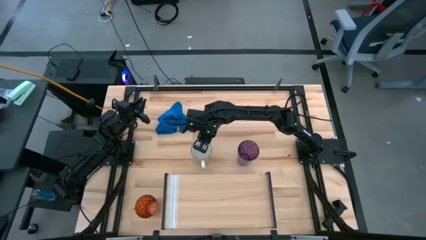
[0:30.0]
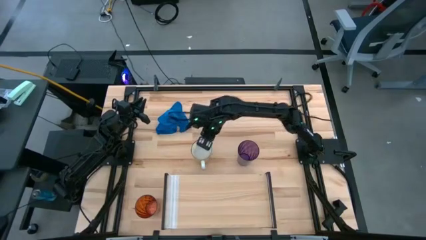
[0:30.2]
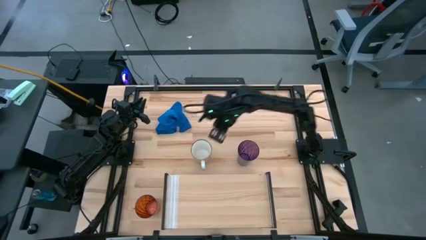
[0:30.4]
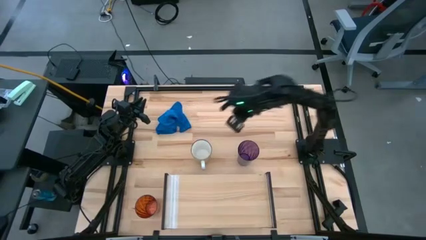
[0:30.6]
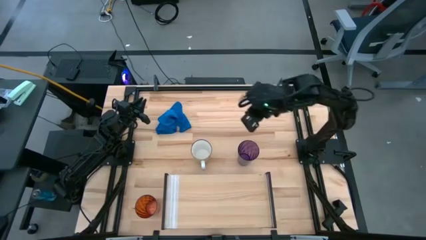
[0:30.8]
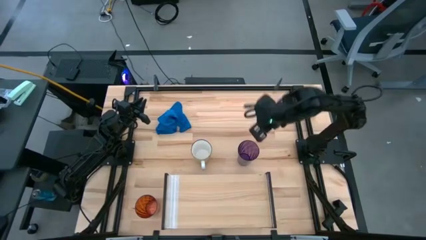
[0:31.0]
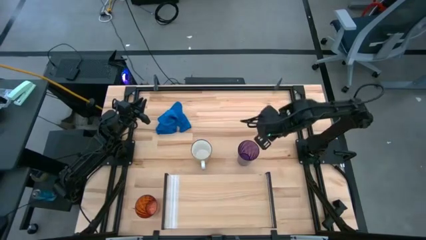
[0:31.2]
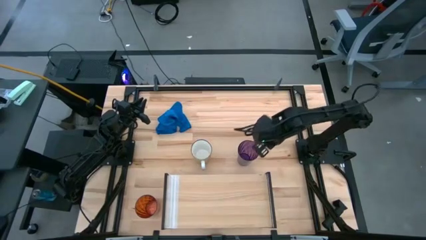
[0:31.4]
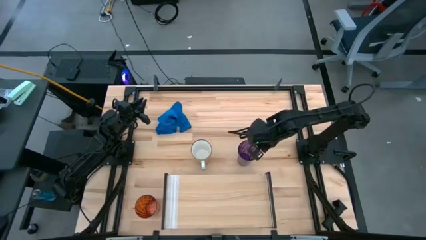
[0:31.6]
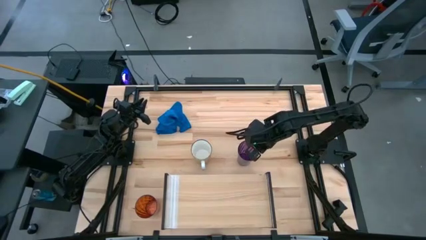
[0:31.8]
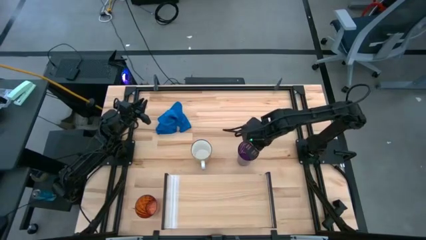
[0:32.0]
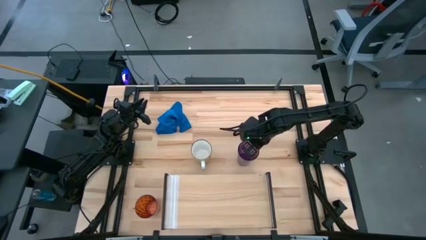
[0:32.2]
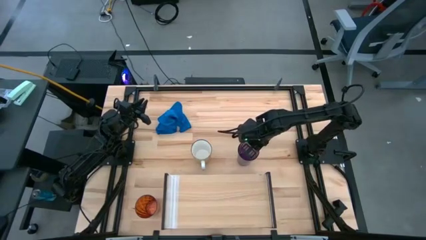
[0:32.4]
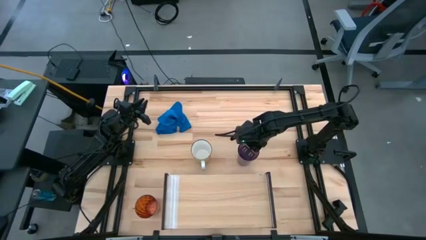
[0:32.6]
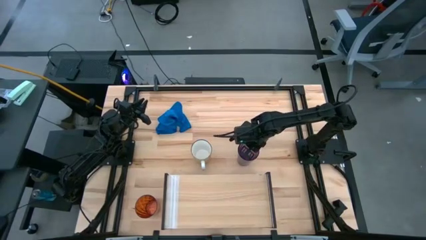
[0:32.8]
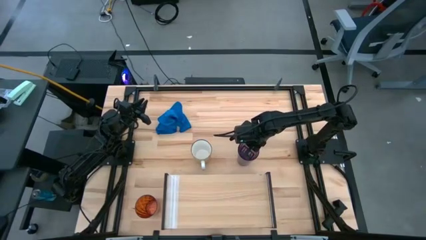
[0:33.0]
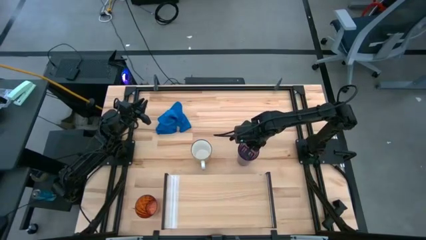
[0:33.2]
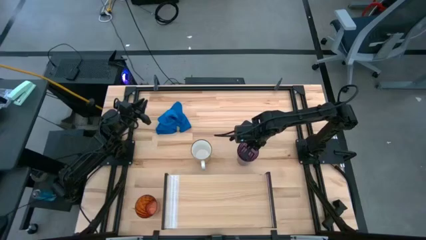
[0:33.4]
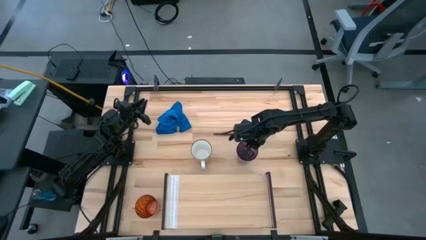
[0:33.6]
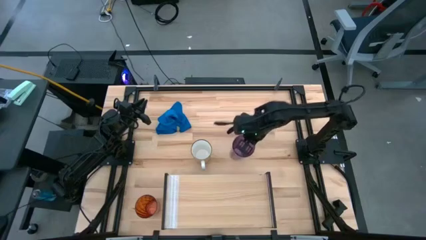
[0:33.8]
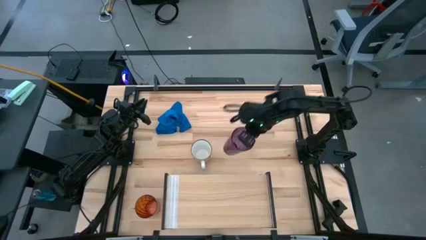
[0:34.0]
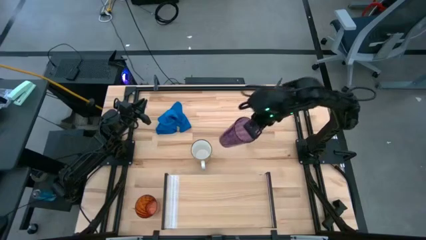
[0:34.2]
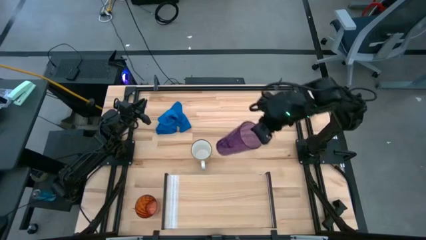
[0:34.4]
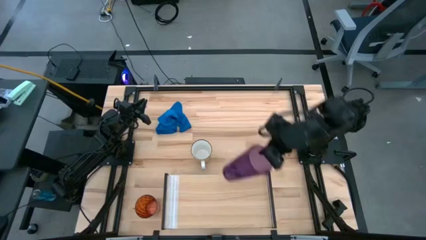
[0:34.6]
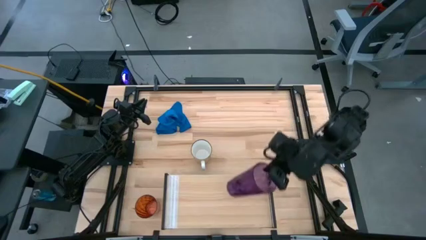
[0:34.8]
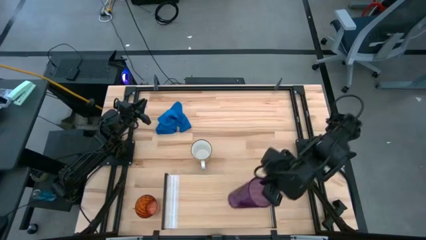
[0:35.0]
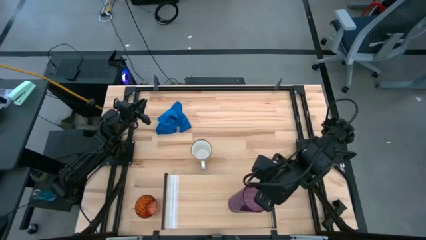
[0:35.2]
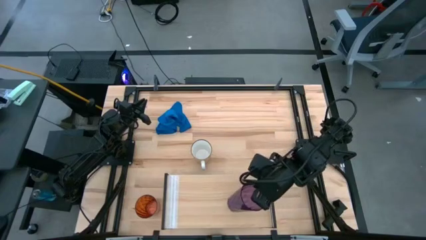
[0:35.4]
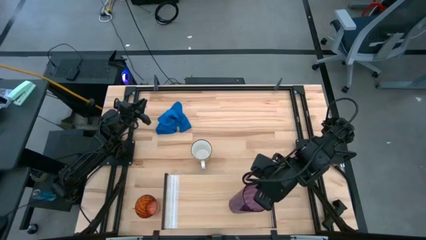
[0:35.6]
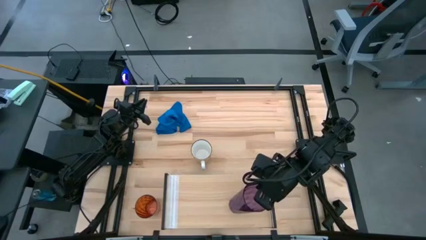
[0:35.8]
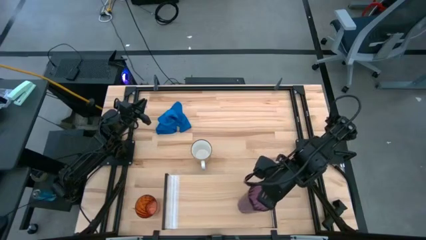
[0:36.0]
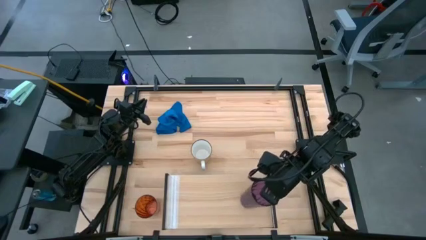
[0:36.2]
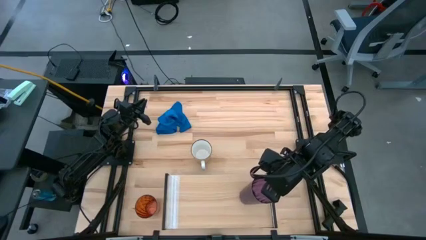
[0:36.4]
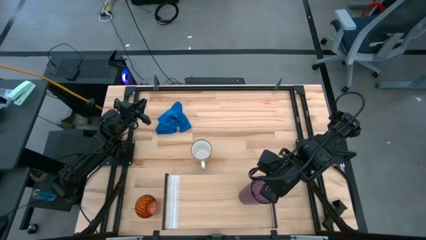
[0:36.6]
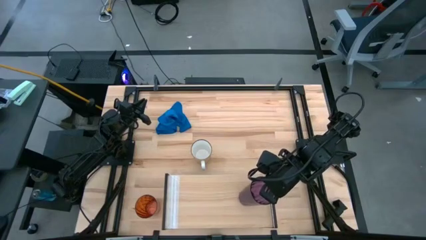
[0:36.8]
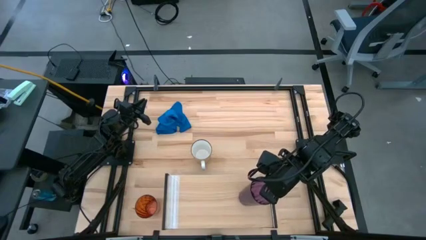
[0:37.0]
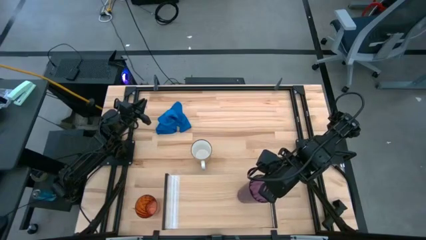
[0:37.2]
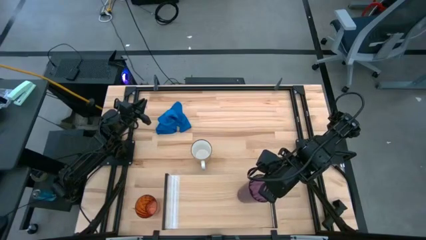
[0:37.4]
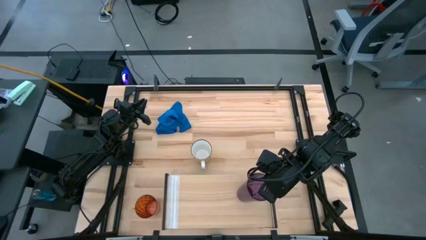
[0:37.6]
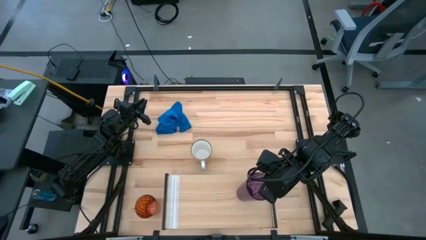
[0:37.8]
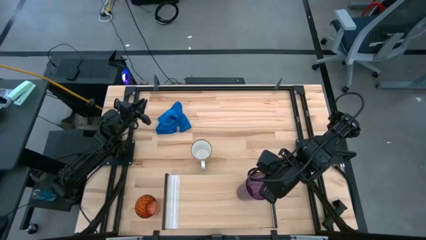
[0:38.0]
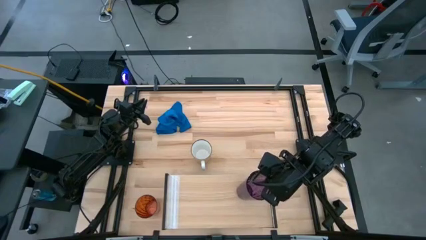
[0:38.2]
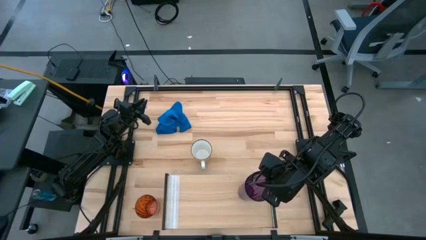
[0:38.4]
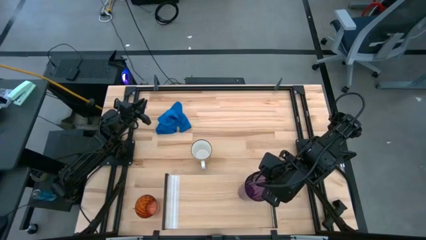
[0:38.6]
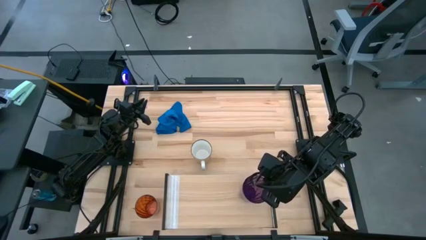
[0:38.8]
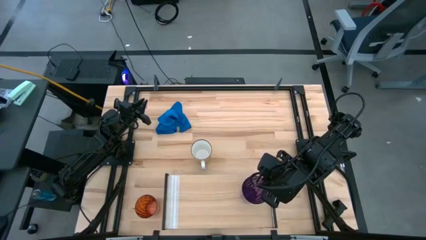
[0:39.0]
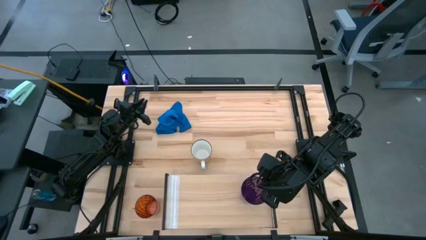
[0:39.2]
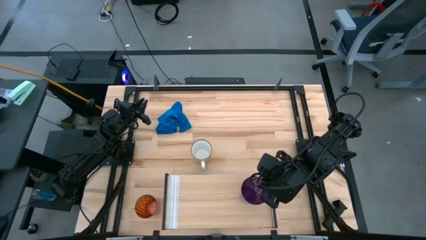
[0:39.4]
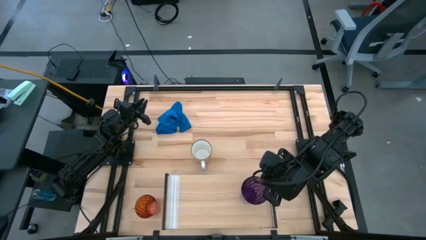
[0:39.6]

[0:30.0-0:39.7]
Task: Stack small to large cups/mugs on shelf
Put the purple cup on the shelf

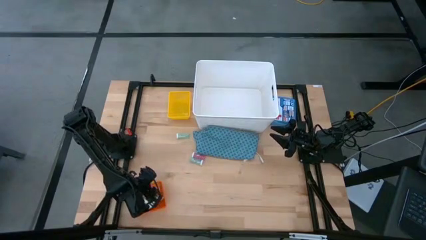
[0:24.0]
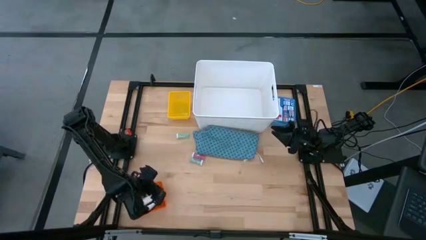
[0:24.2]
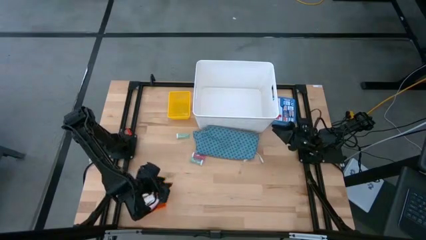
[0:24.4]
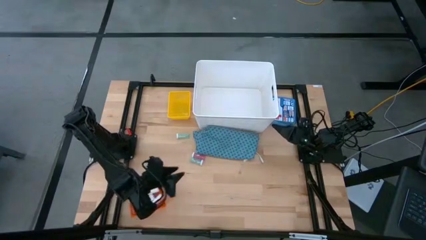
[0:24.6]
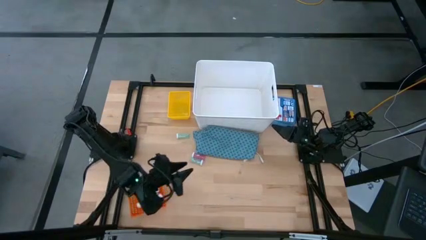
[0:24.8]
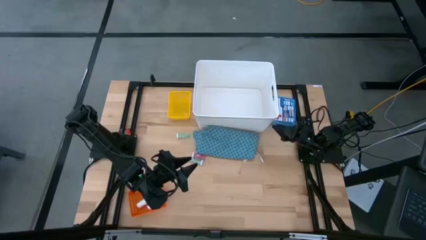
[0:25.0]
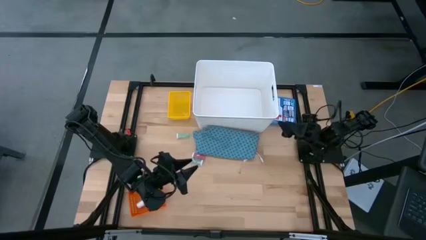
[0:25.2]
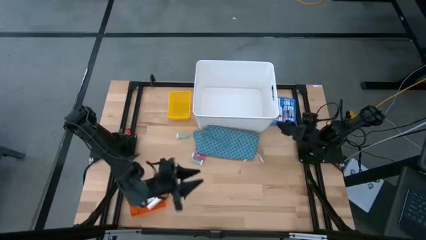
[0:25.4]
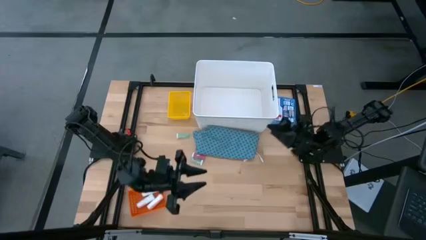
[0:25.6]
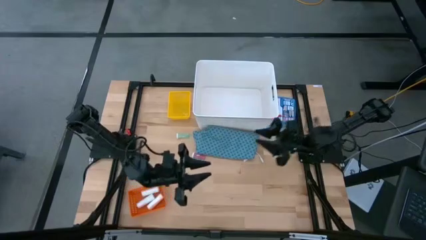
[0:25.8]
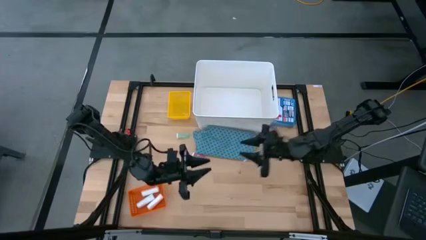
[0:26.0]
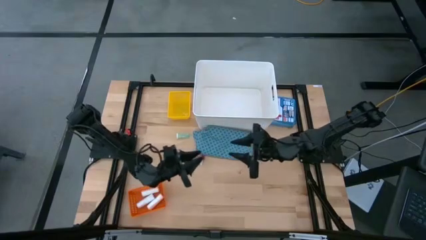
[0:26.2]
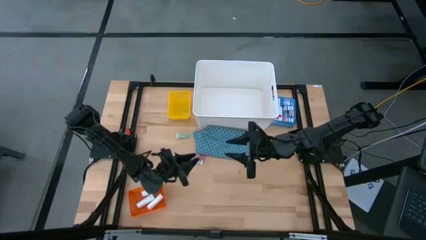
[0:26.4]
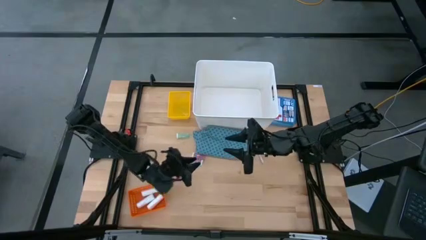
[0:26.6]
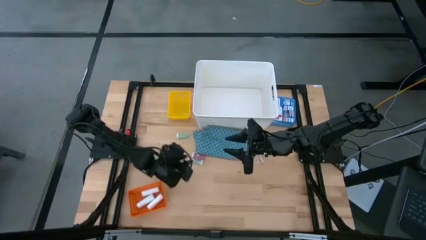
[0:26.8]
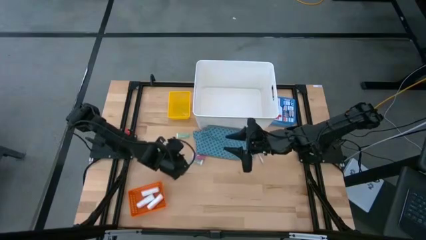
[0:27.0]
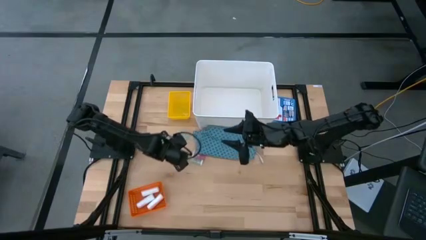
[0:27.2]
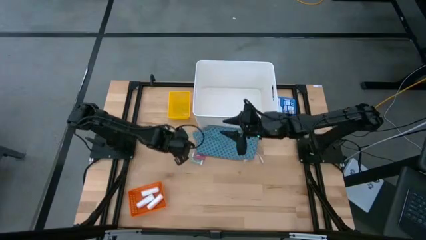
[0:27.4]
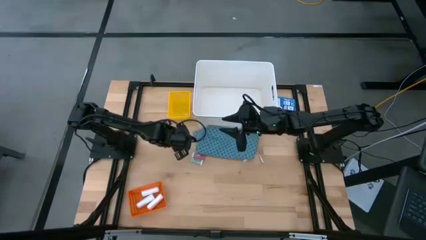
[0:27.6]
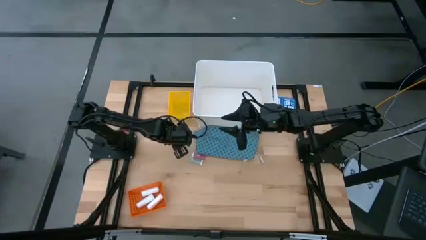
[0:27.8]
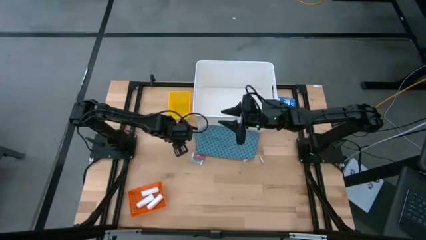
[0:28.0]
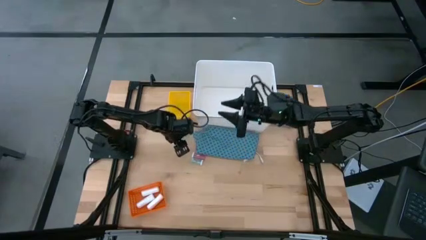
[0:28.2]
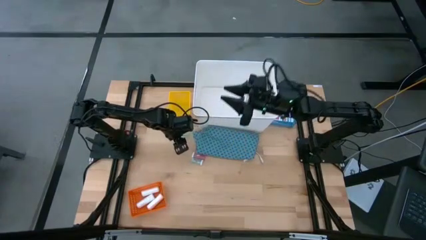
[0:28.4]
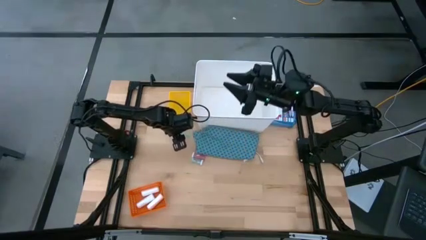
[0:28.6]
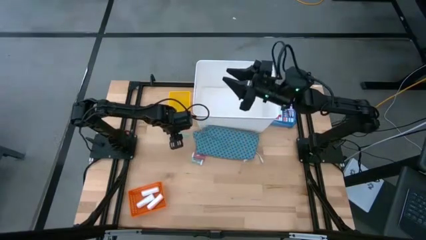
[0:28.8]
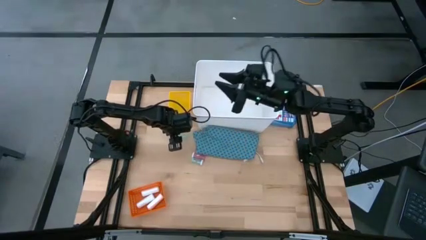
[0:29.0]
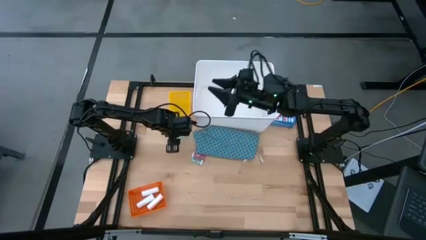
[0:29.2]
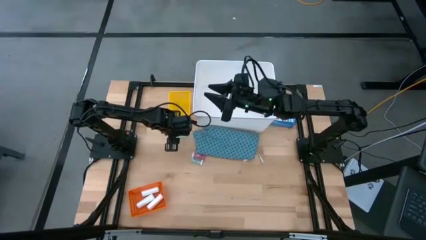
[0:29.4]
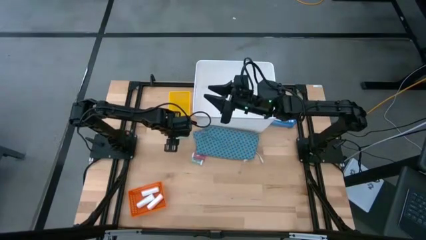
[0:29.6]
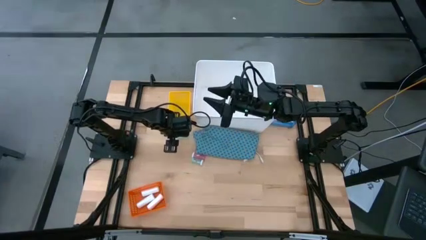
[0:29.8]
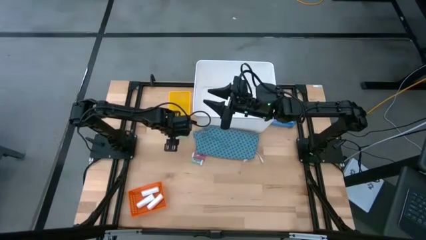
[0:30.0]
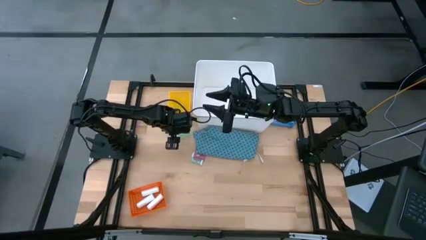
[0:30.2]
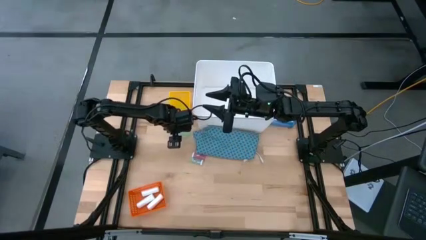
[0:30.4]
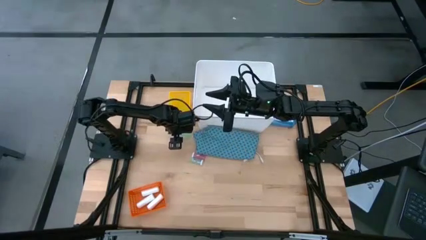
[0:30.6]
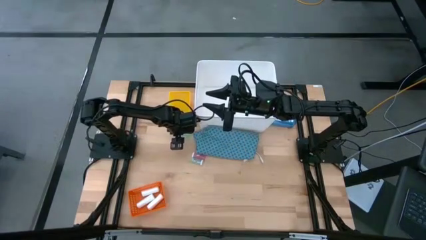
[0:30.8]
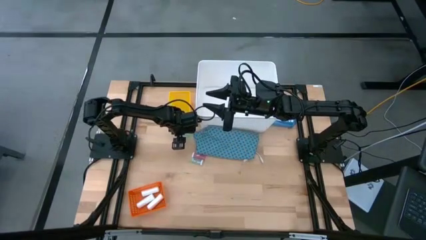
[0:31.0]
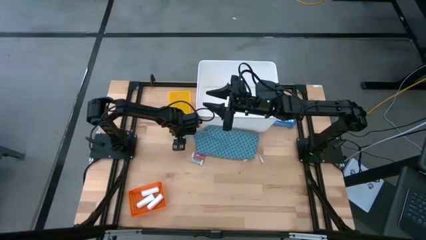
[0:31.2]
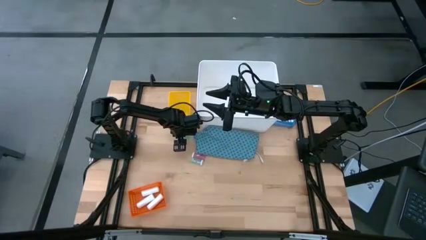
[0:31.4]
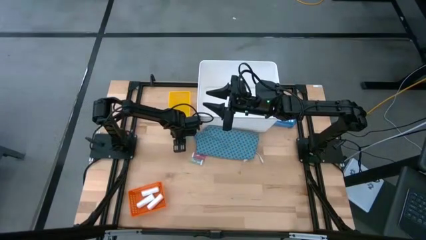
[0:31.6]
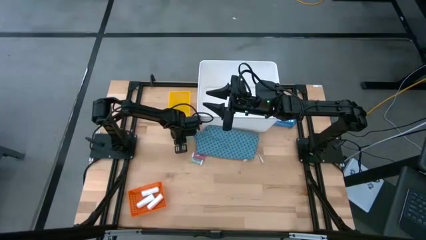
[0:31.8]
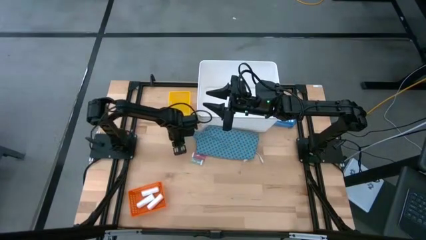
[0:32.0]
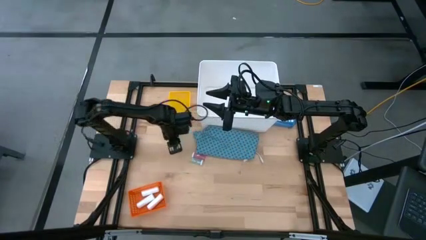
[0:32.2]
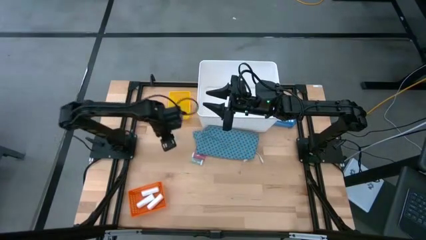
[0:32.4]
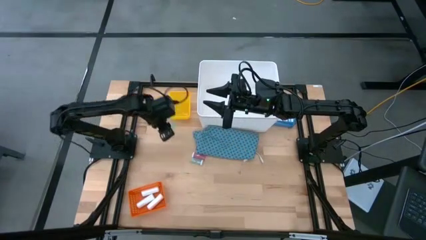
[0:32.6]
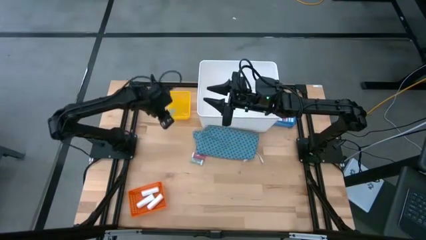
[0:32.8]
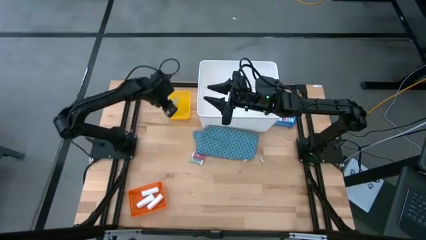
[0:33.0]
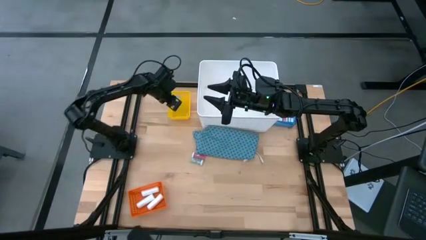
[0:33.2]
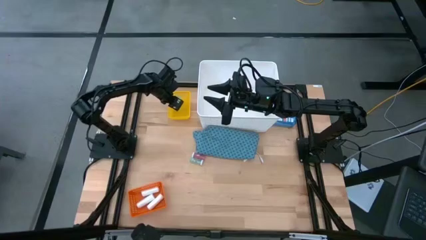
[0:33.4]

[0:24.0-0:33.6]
Task: Pick & place medical supplies in basket/bin
Put the top light green bottle into the yellow bin
